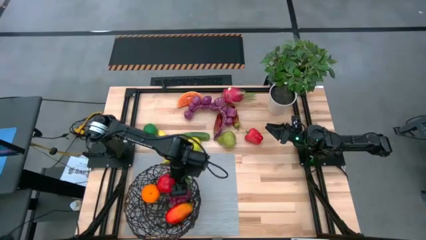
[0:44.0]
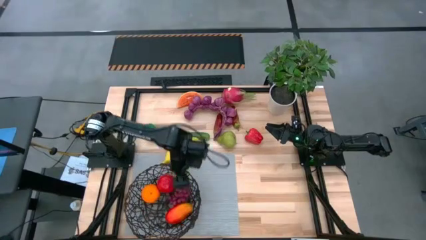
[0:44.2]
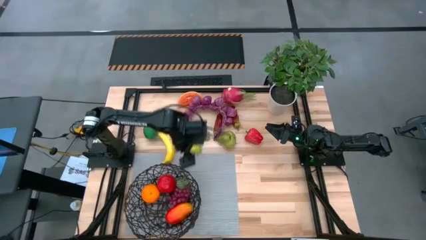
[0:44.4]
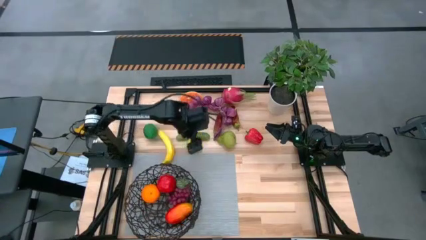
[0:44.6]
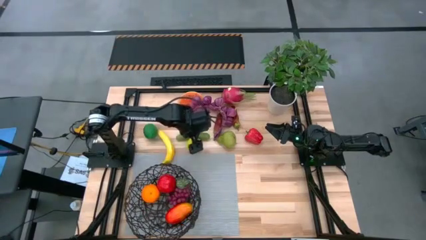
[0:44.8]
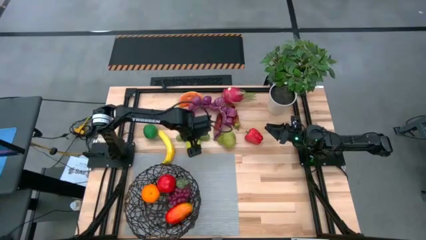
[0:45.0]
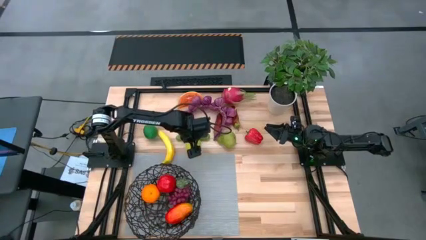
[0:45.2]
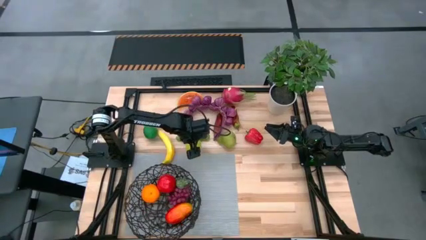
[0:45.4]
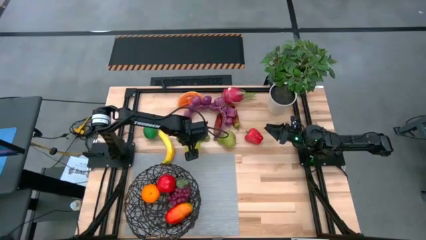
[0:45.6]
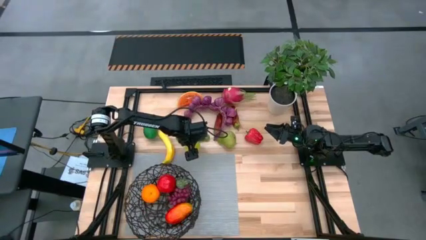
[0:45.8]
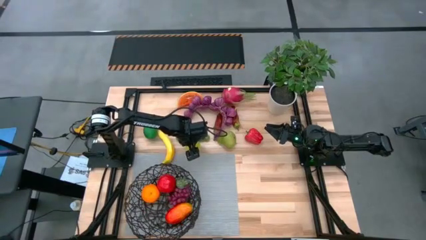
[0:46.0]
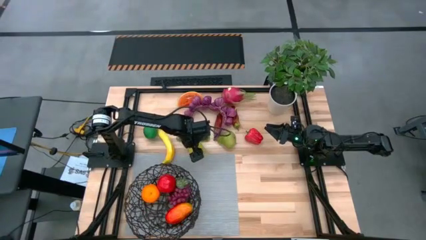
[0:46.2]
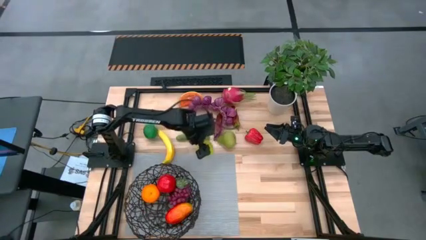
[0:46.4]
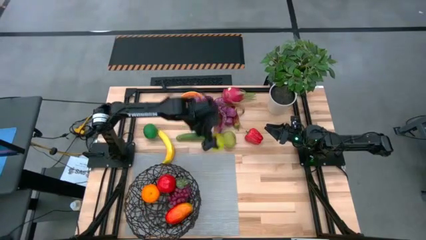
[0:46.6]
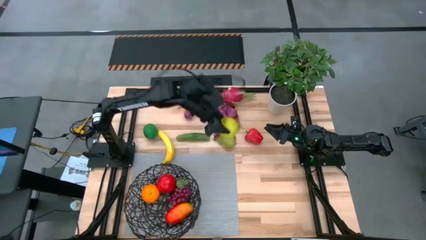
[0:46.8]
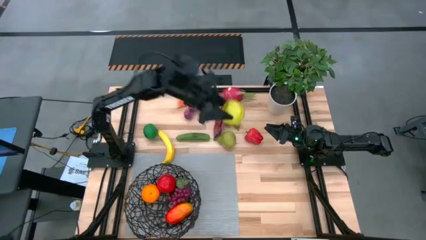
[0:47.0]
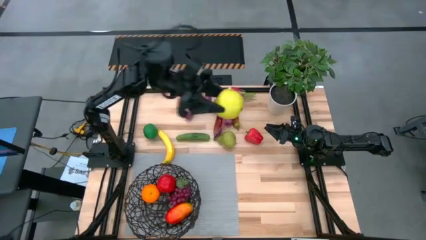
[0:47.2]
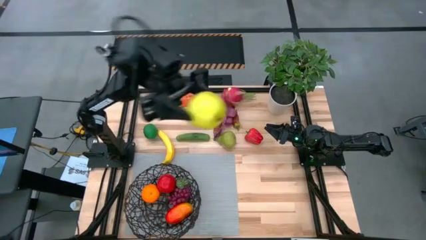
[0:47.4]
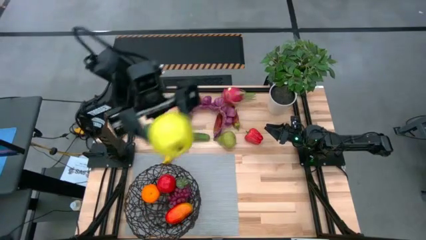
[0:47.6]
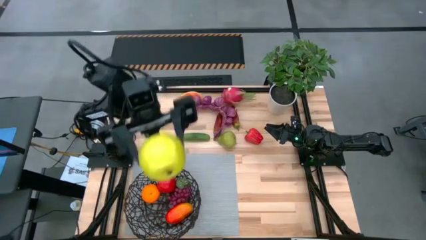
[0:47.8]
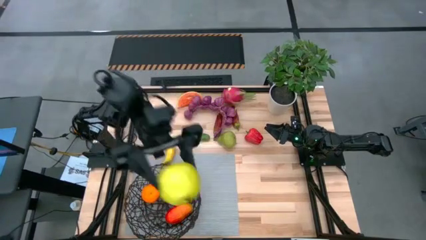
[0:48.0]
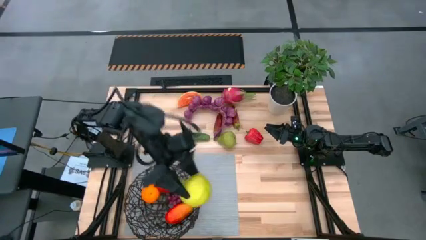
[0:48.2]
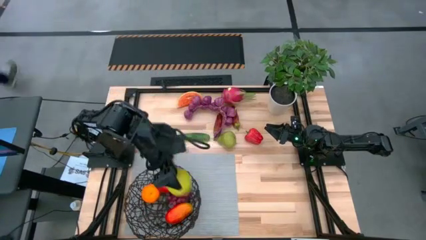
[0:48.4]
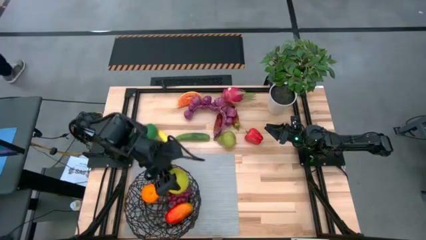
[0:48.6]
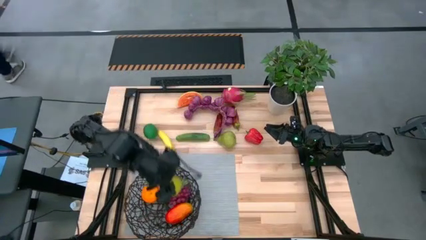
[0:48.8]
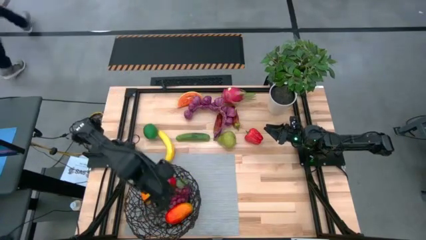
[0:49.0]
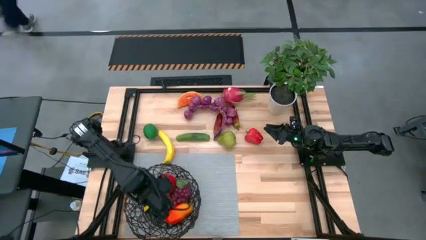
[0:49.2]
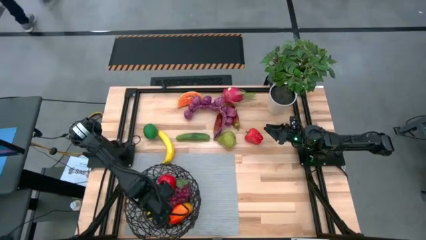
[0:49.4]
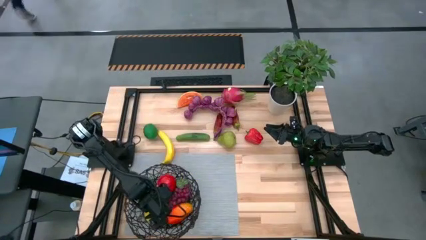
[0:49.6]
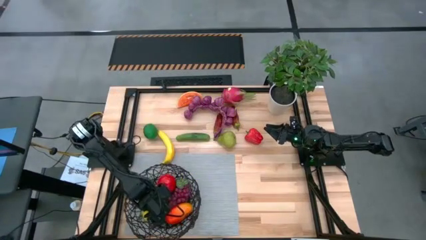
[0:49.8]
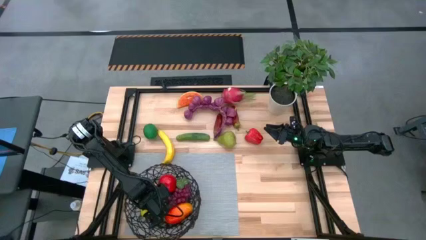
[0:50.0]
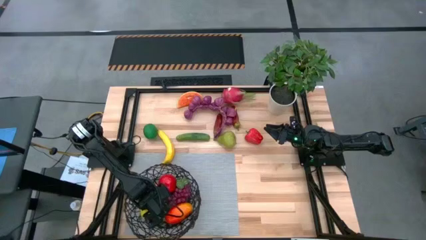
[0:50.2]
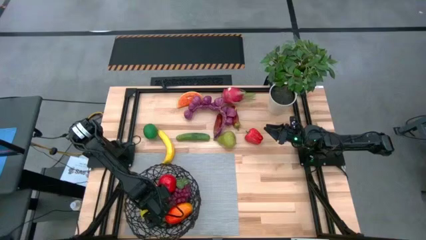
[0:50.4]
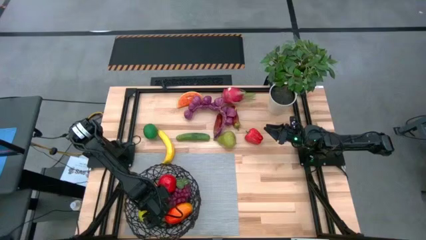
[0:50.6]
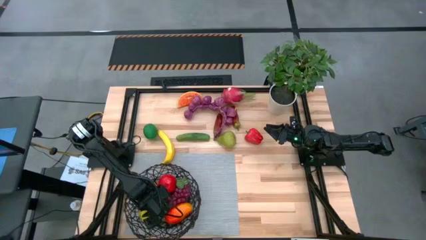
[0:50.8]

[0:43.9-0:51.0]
Task: Build produce basket
Put the green apple into the black wire basket

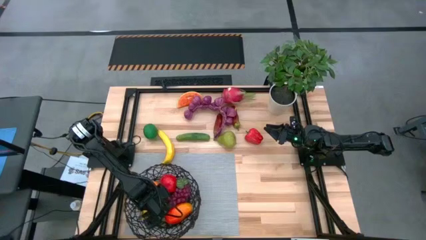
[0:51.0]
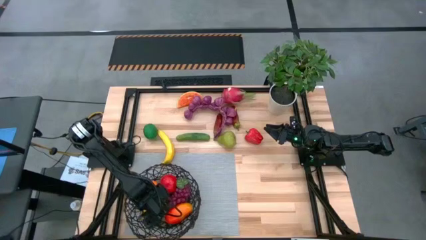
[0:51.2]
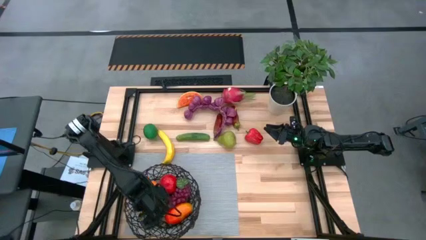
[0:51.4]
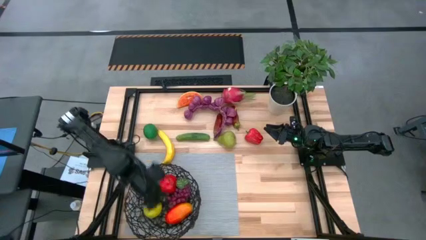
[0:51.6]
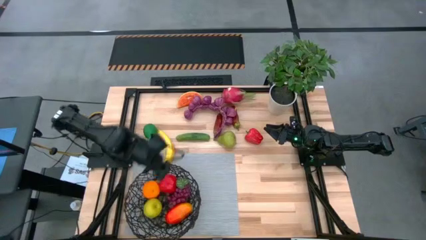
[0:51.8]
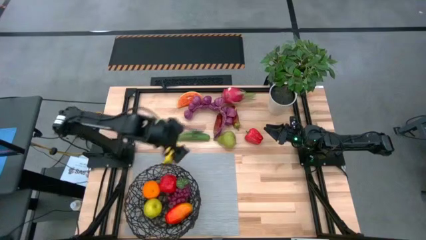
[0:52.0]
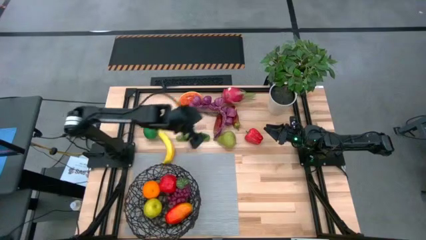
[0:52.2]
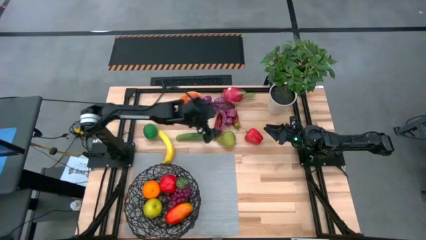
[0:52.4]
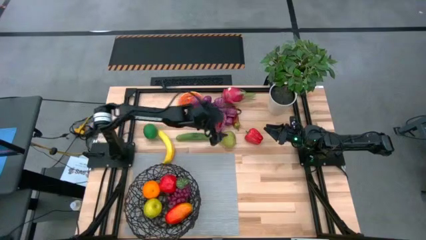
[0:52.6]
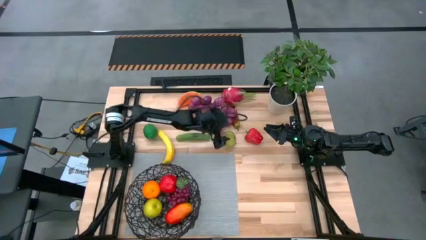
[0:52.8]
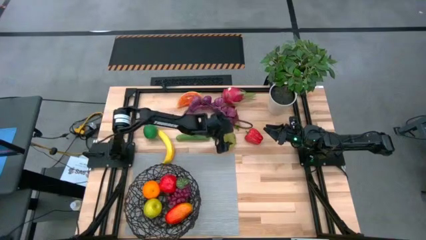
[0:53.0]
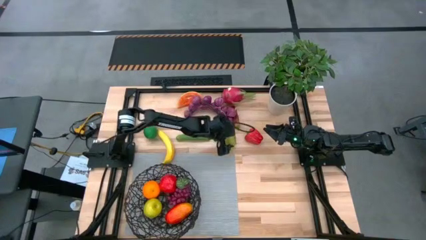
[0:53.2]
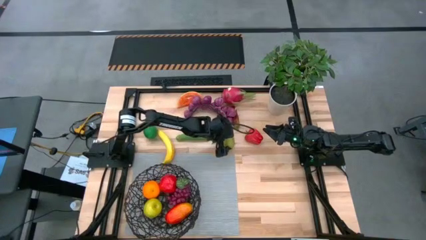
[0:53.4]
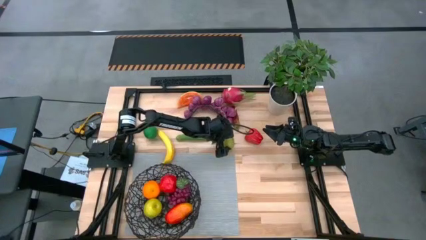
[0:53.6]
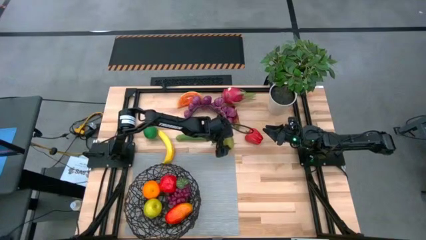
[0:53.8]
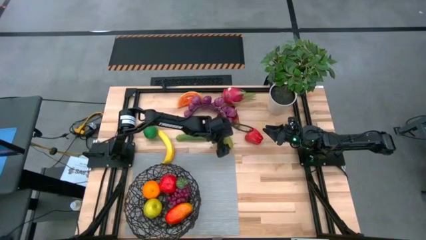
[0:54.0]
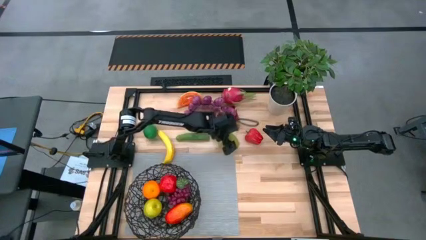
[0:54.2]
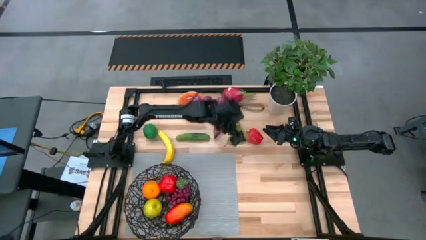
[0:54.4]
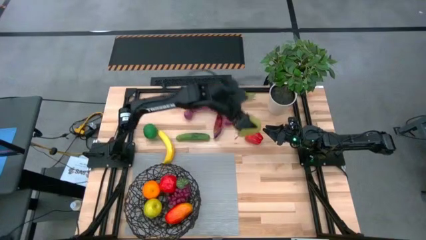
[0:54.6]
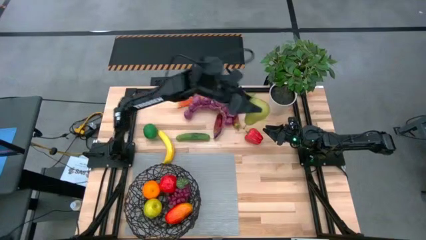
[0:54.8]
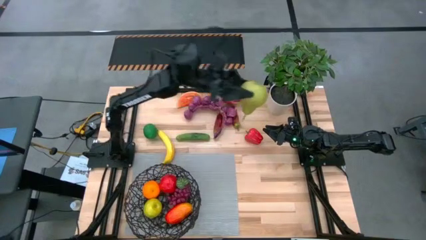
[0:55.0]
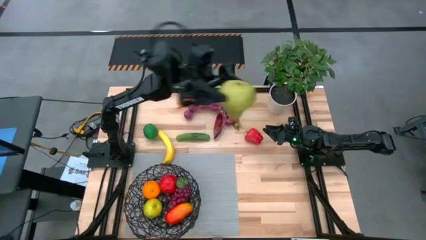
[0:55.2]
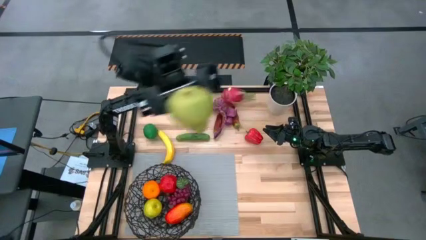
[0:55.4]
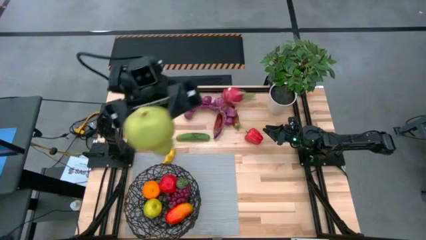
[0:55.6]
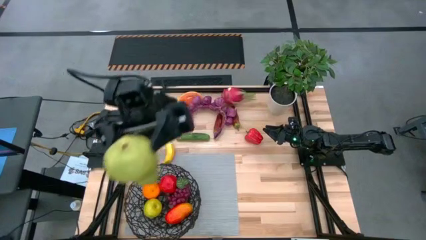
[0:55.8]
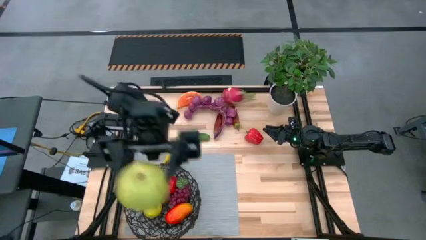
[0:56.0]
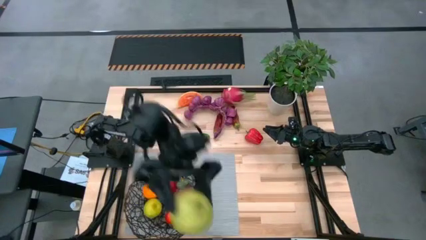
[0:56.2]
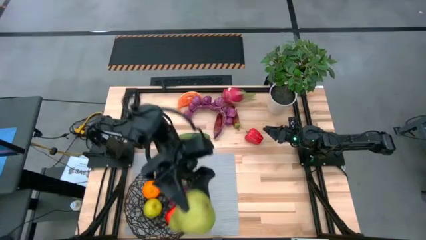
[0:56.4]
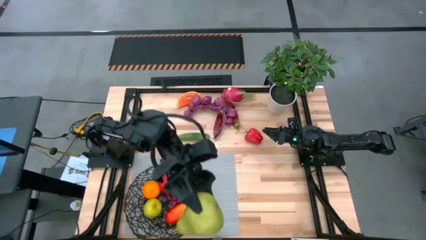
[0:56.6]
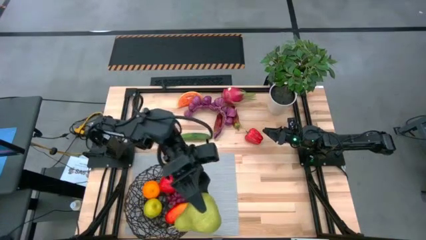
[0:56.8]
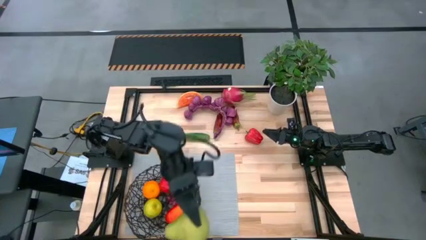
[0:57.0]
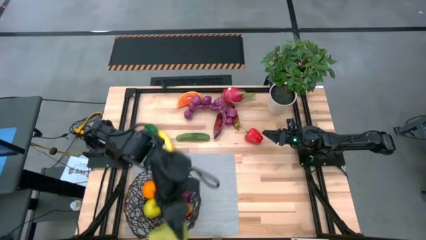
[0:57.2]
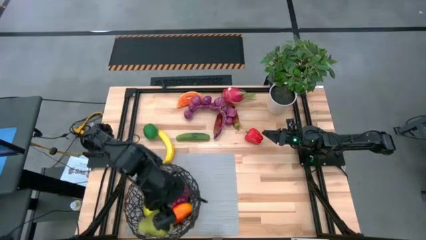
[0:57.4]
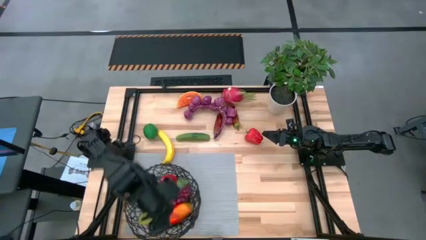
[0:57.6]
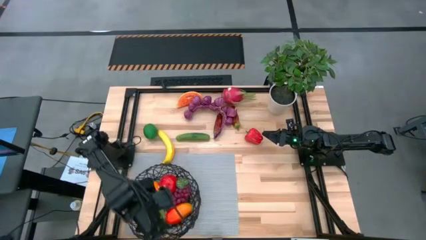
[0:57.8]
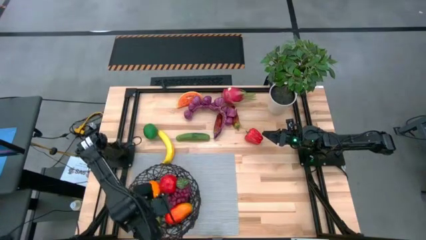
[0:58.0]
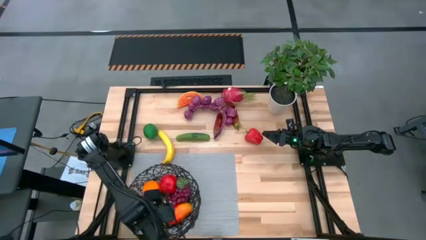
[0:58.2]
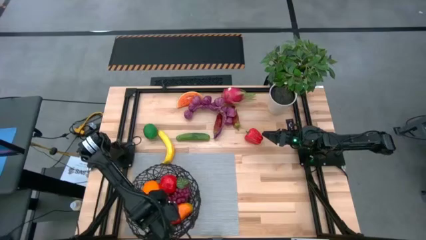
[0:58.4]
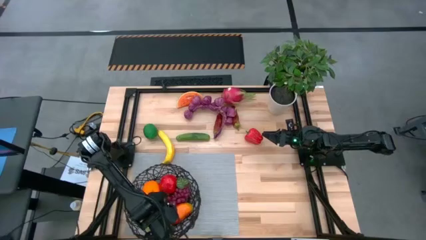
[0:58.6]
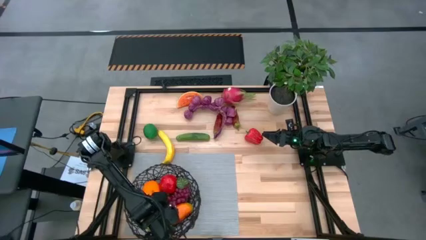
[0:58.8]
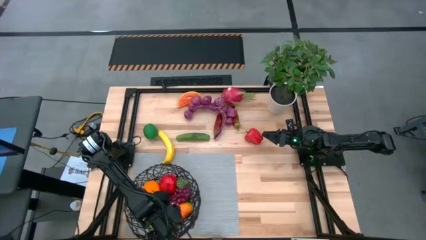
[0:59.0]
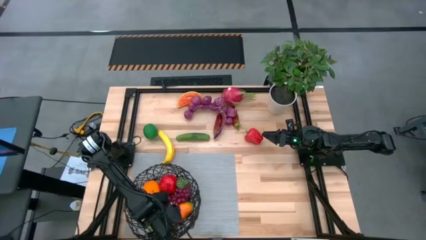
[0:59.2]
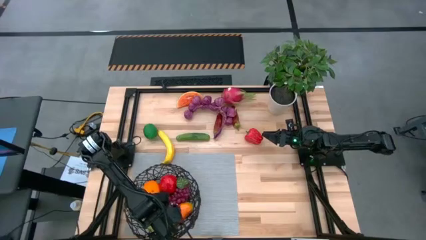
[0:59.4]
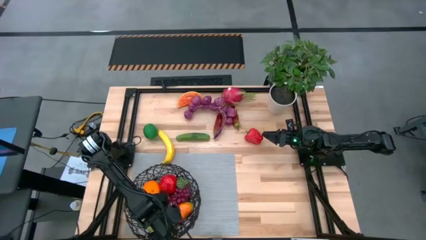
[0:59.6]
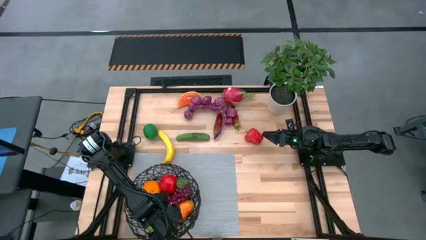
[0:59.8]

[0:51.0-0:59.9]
Put the pear into the black wire basket

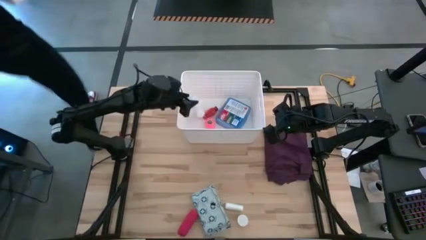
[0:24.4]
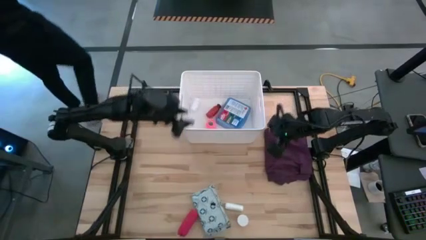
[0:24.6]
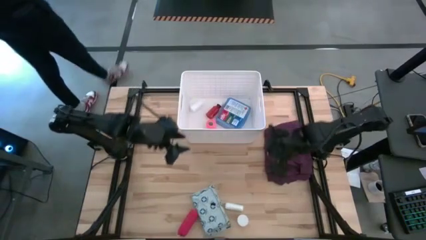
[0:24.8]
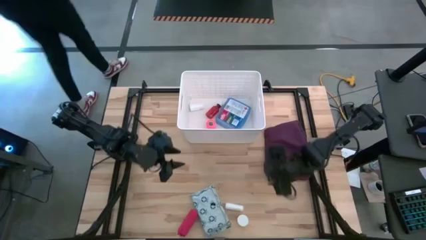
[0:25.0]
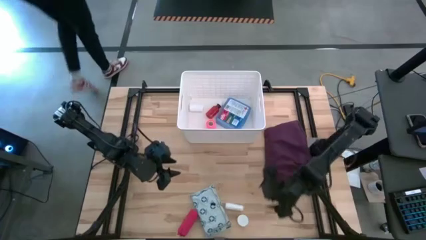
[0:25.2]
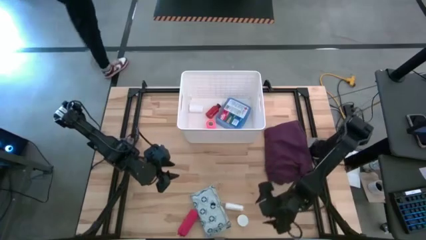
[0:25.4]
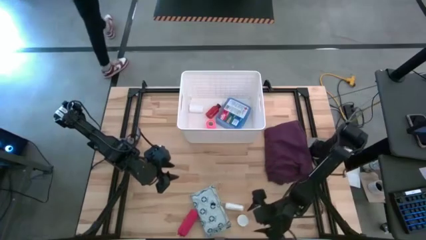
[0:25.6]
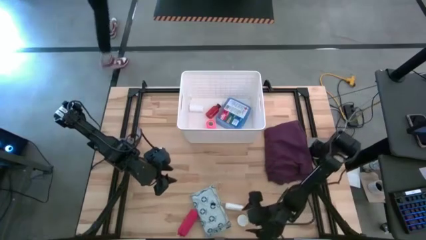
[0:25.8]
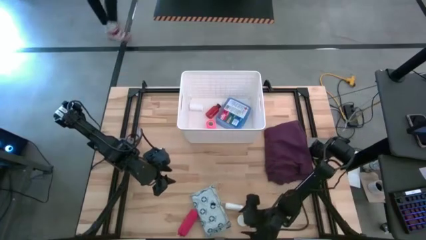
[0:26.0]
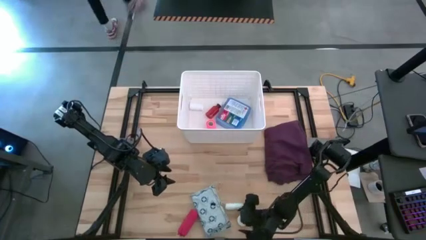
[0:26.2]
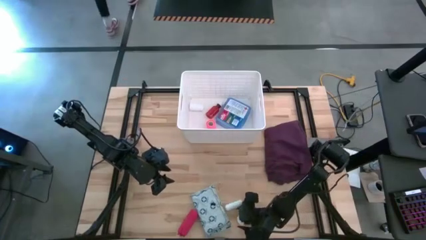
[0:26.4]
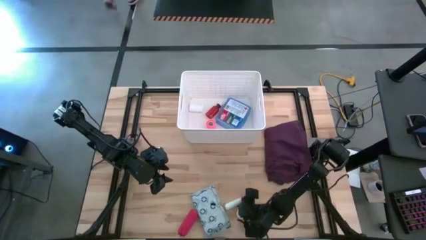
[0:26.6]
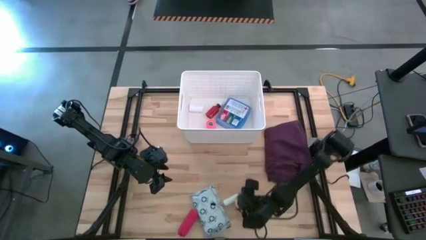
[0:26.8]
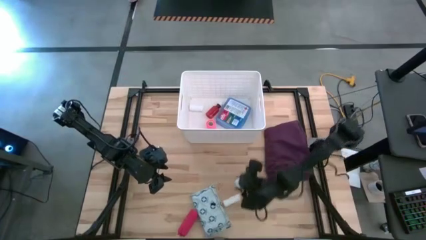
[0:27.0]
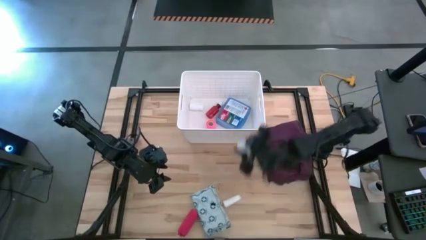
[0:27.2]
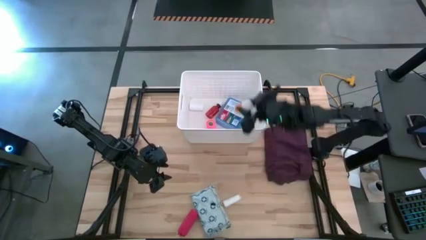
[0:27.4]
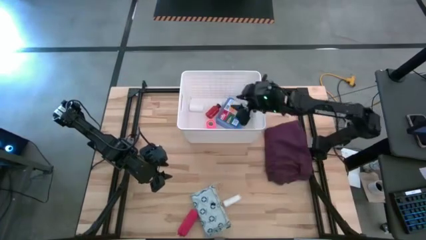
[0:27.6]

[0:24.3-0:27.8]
Task: Pick & place medical supplies in basket/bin
Put the orange pill bottle into the white bin
